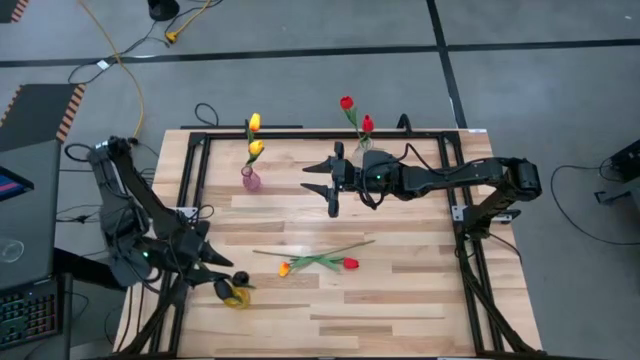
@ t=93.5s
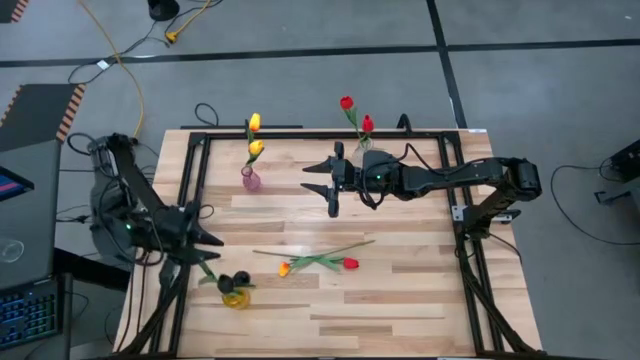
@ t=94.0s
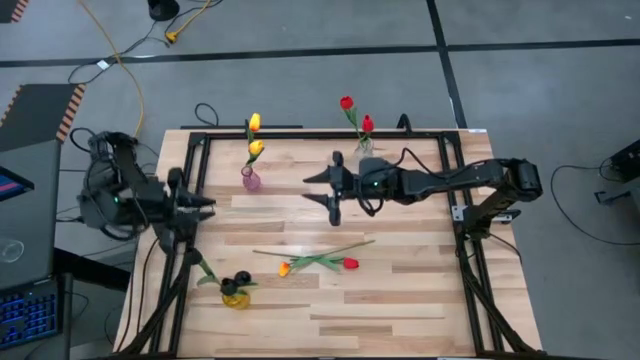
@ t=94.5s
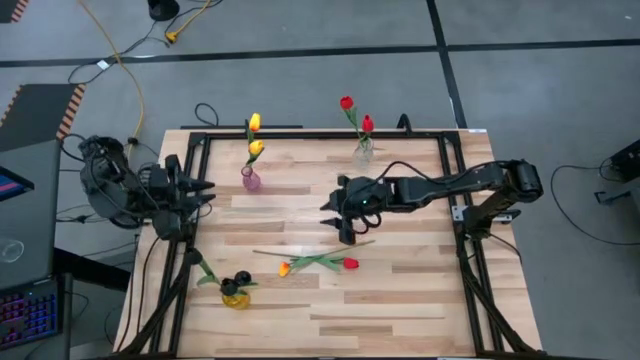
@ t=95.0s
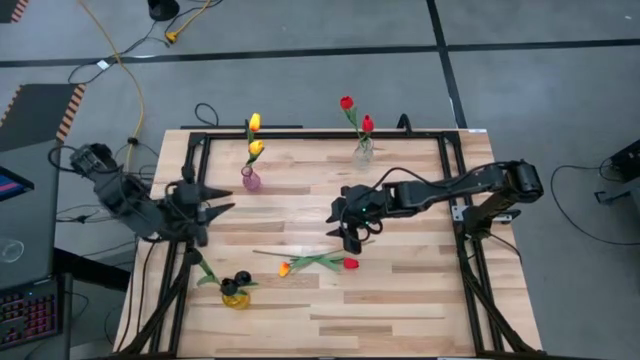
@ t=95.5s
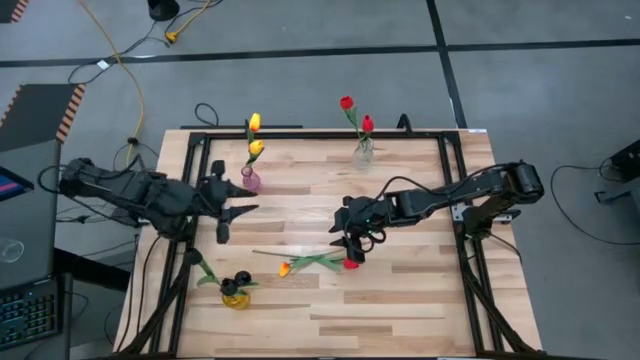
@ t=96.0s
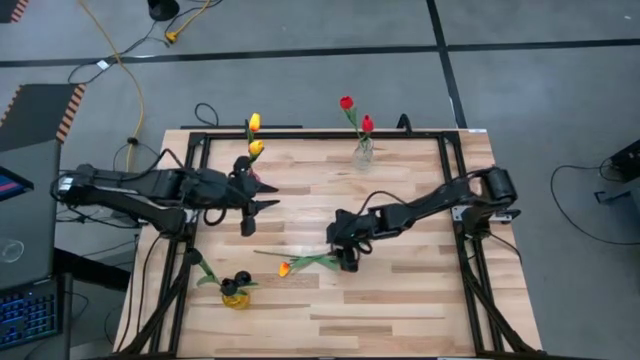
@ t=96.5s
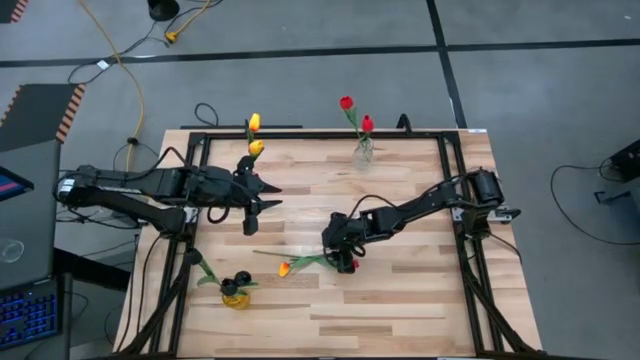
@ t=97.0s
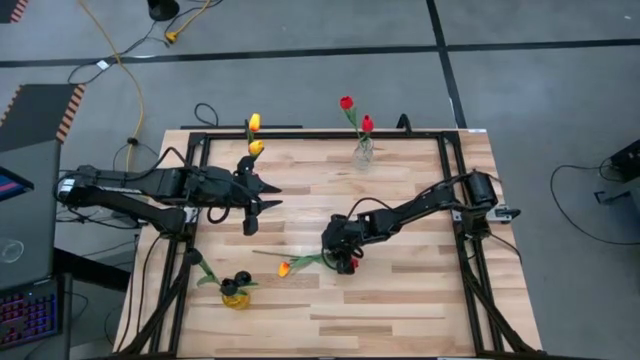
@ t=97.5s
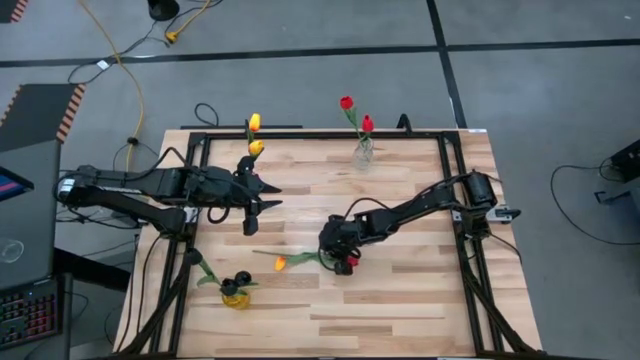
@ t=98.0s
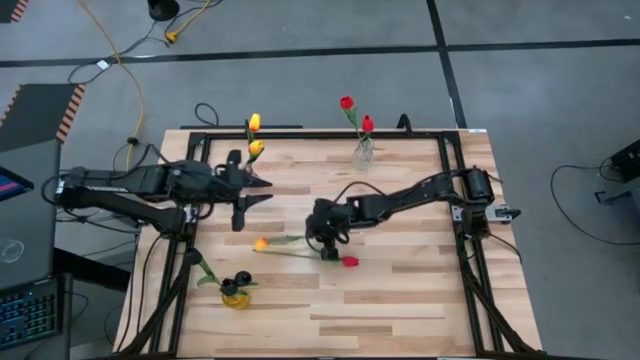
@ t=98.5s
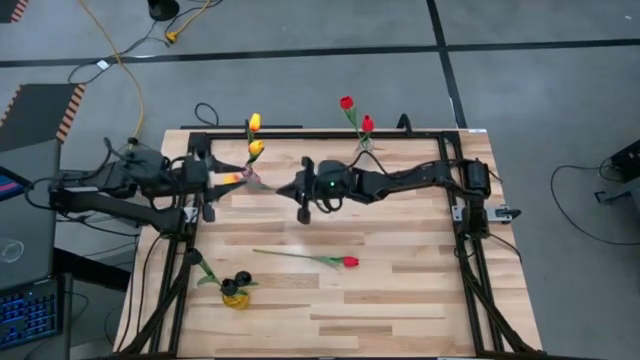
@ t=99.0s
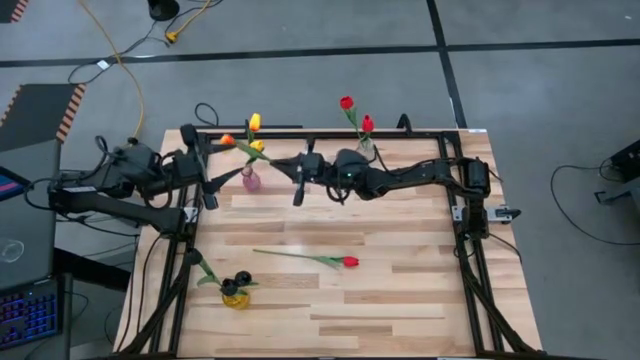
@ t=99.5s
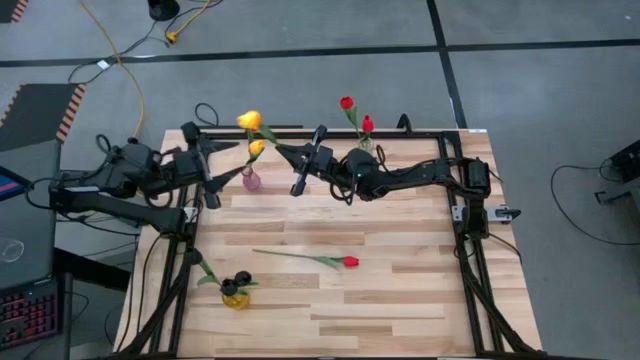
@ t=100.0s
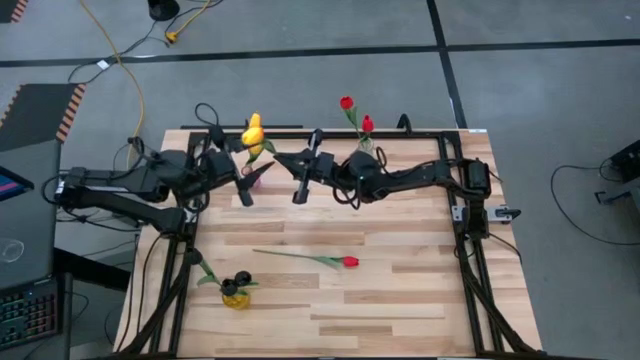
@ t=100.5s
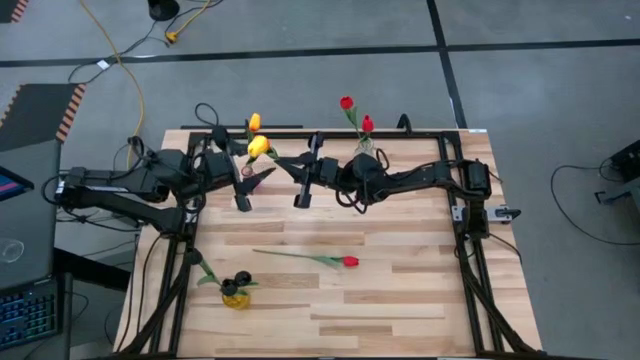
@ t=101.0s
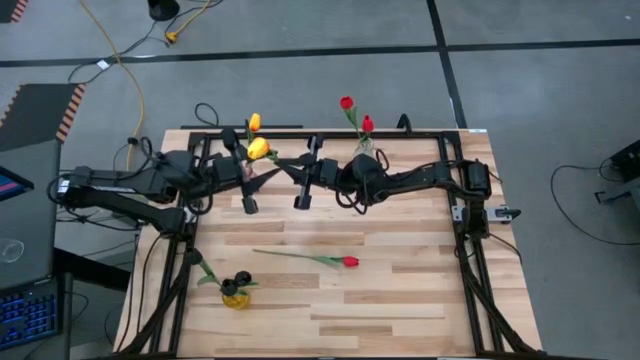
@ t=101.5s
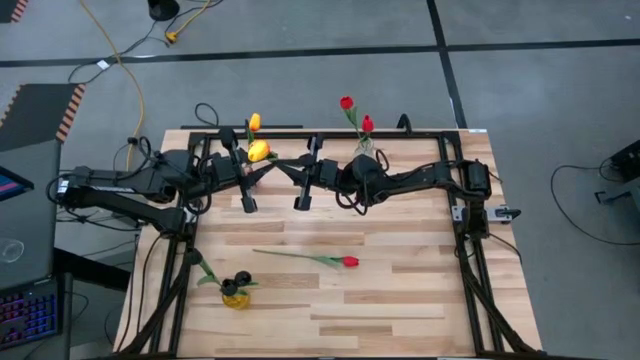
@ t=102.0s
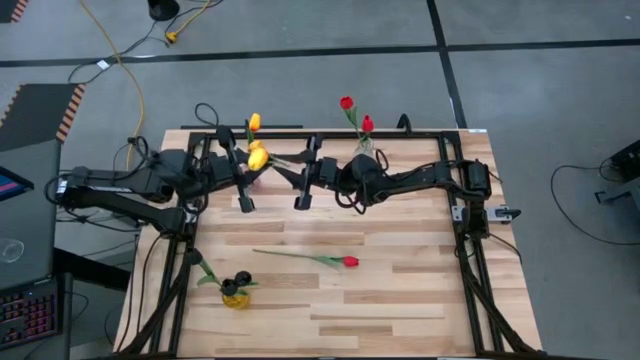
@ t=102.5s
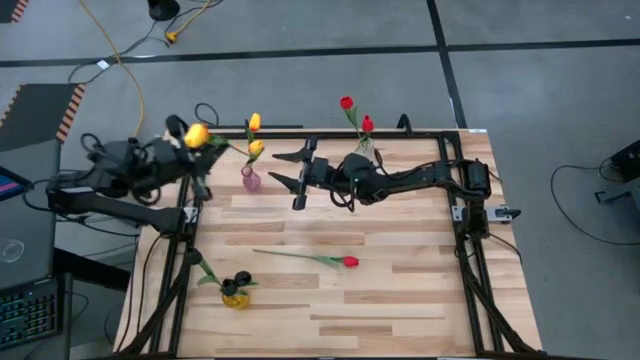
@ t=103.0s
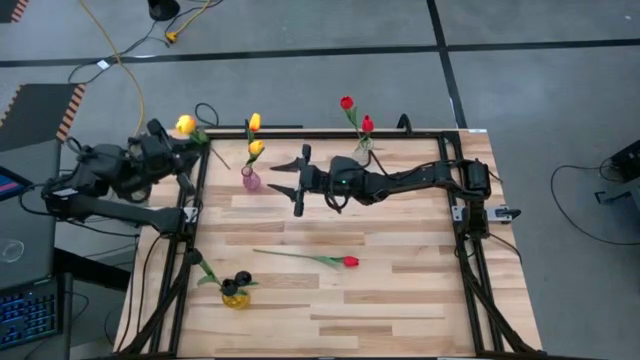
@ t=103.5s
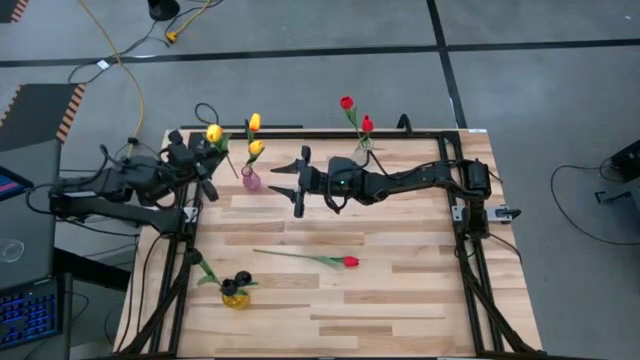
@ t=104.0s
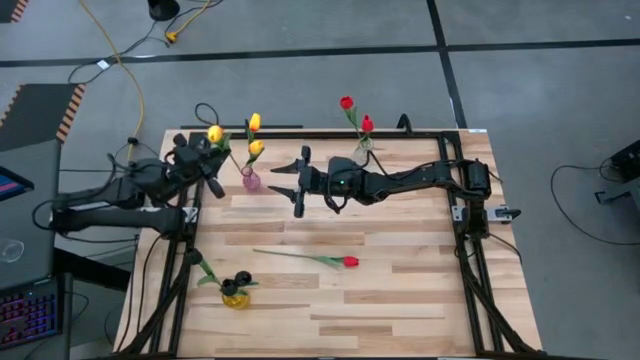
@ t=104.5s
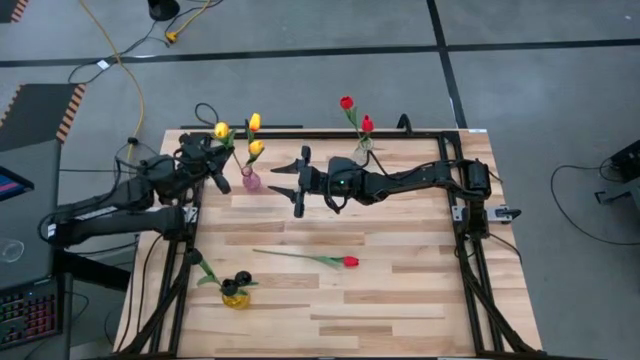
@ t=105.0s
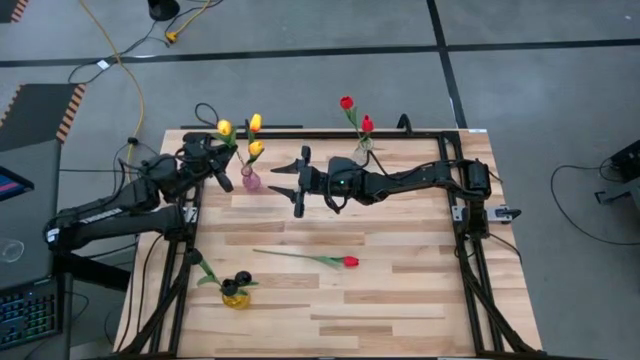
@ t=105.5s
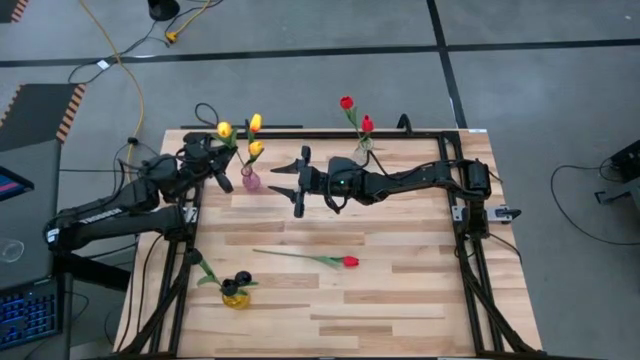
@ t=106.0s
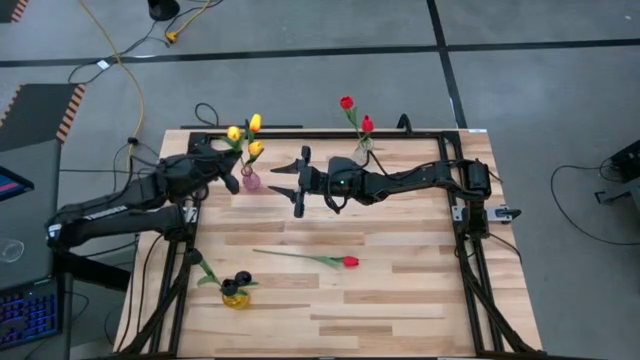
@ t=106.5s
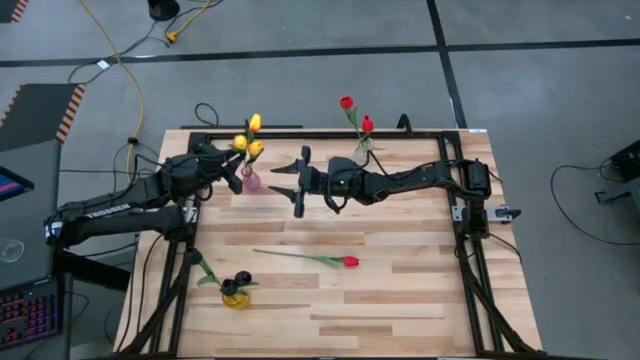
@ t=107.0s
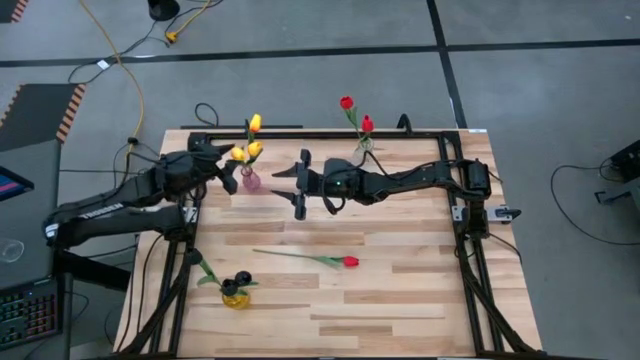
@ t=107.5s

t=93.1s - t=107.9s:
Task: Sort flowers into vase by color
Put the yellow tulip into the purple vase

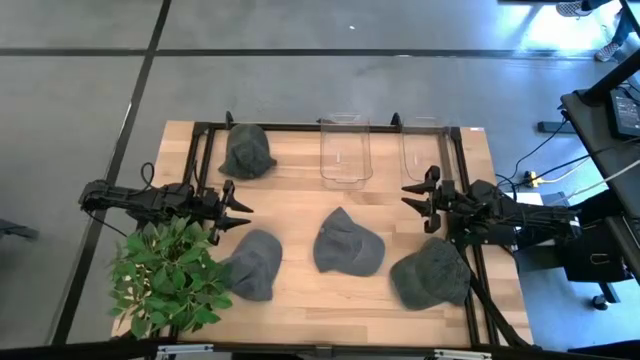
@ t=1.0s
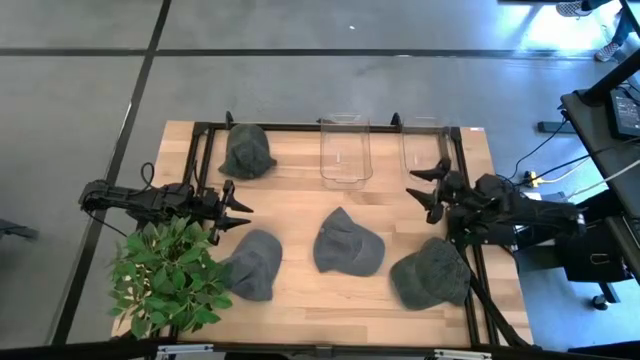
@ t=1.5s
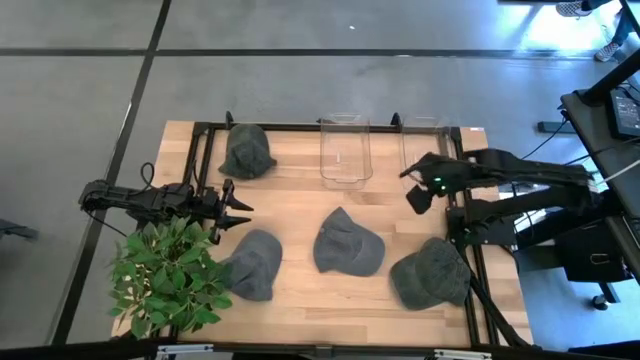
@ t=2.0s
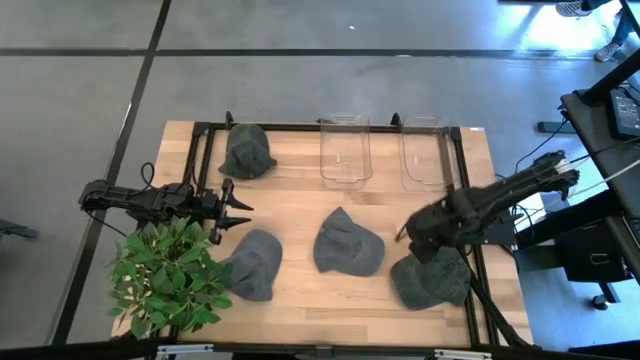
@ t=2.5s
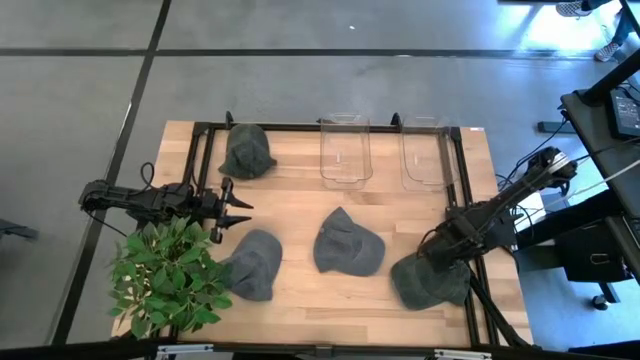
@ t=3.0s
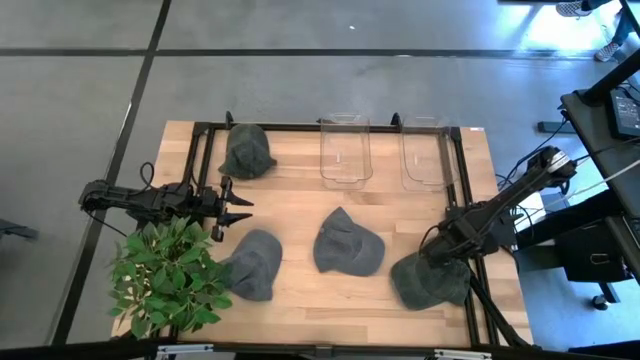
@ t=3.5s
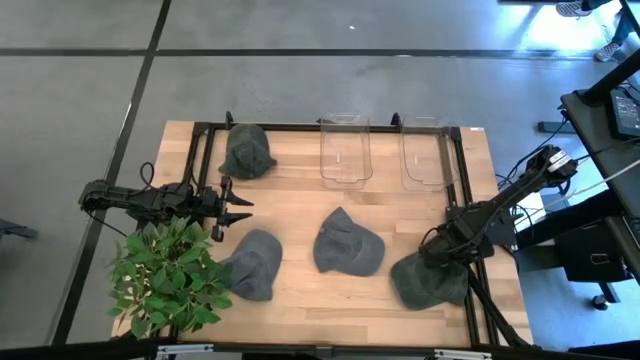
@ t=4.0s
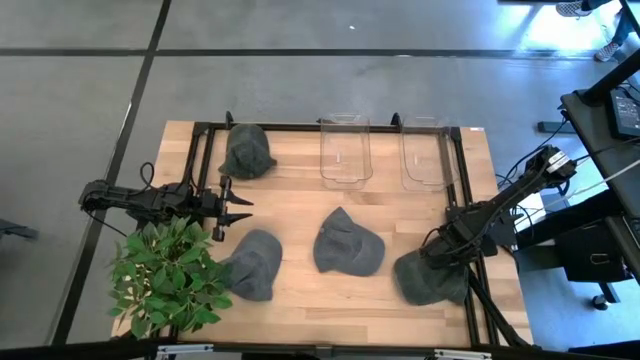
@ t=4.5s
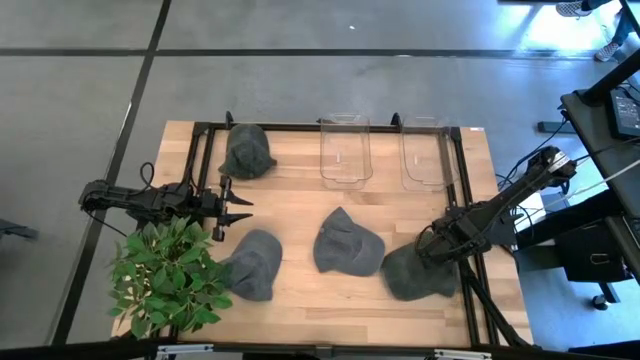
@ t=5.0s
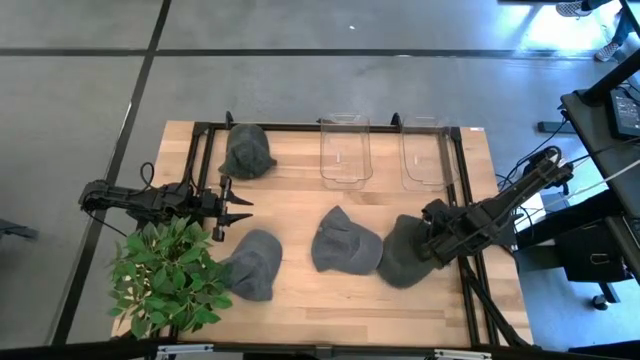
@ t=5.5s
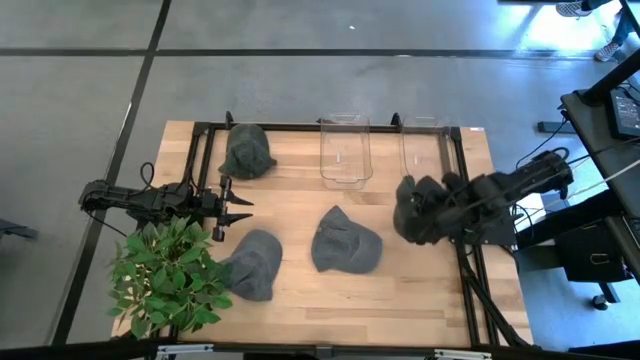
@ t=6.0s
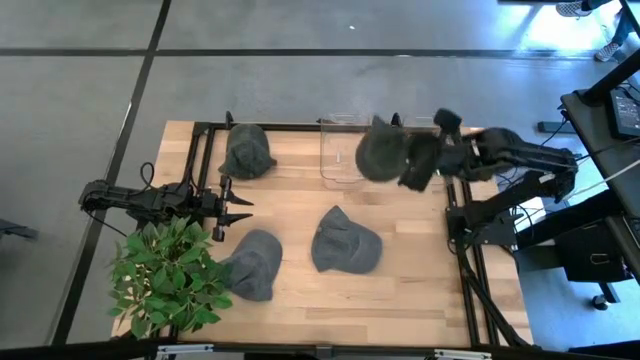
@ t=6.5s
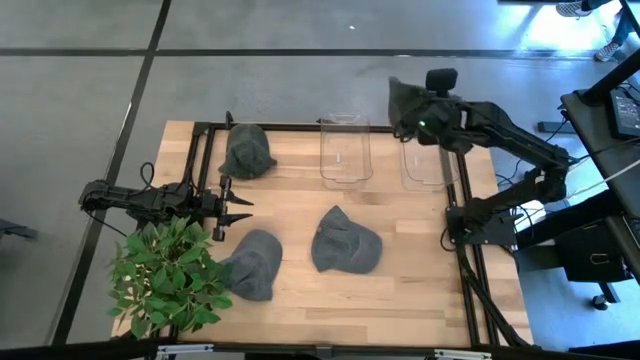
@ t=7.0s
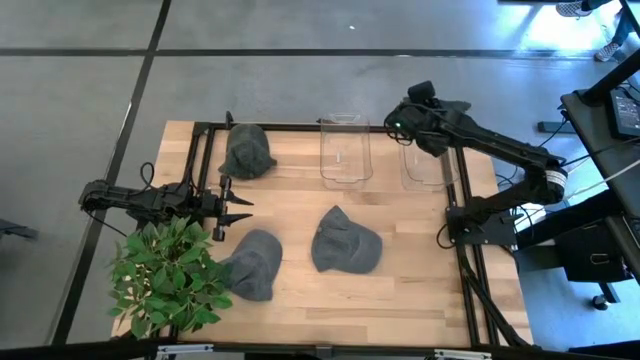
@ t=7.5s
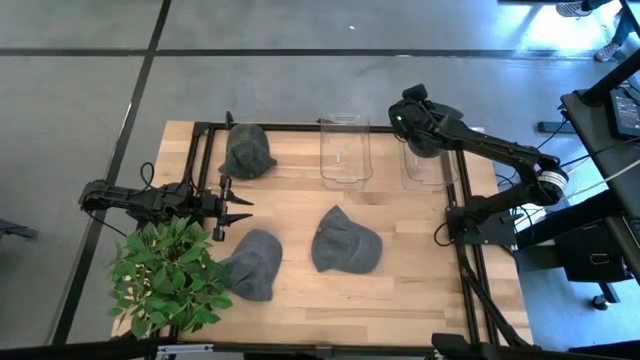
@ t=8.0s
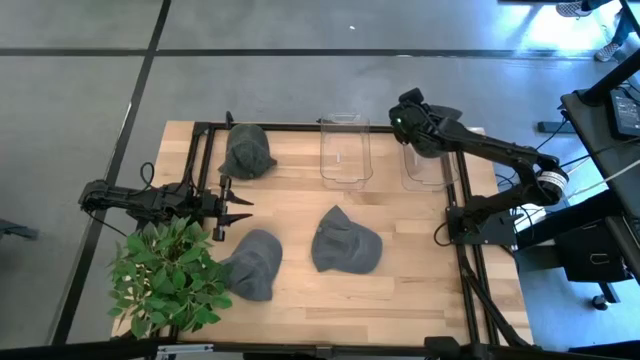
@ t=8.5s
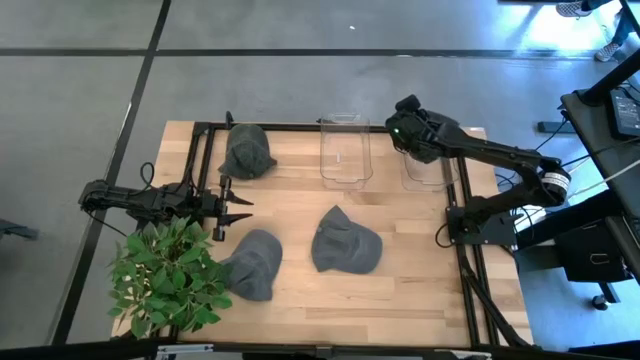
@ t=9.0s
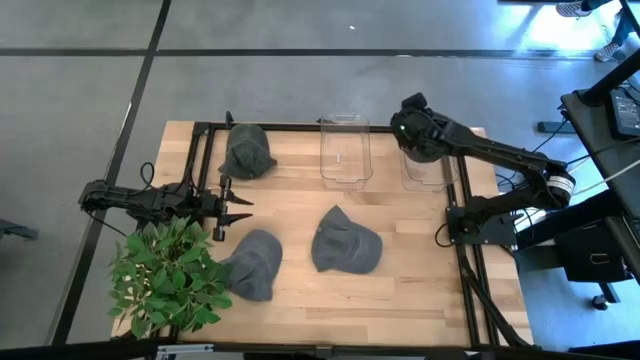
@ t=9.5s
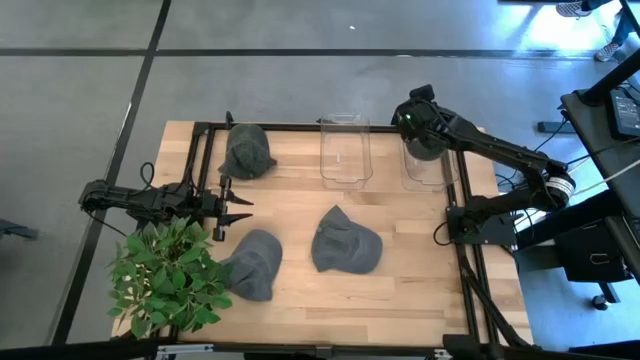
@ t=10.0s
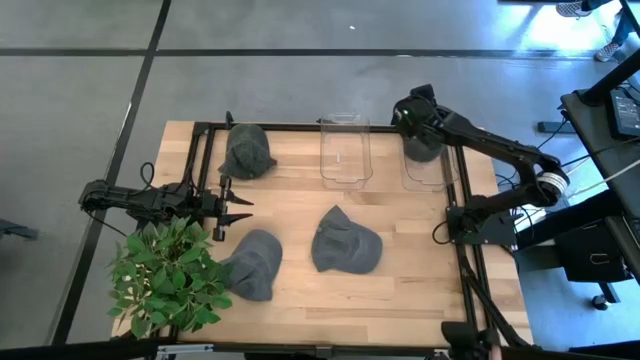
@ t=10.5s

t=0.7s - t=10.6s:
Task: Pick & Place hat
Put the bottom black cap into the right transparent bin
